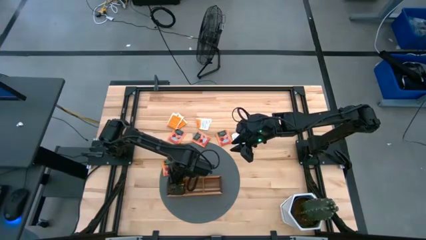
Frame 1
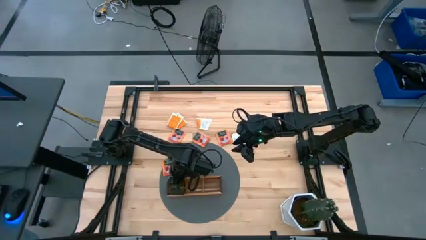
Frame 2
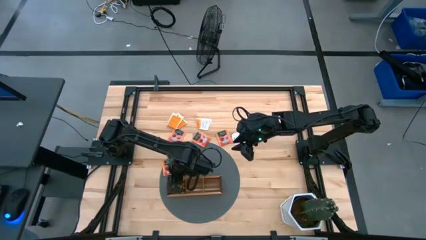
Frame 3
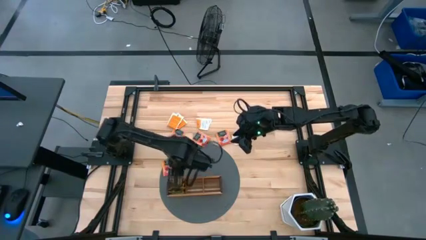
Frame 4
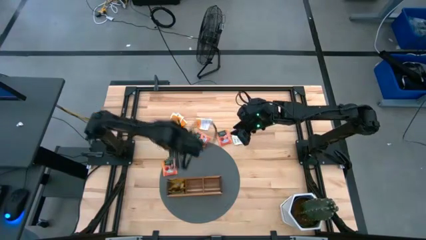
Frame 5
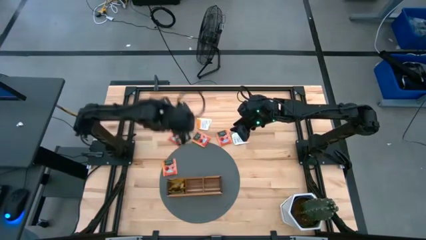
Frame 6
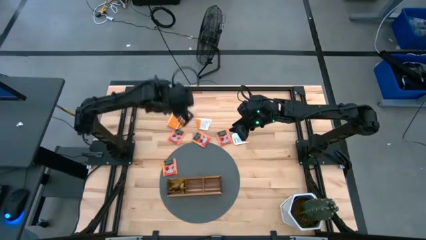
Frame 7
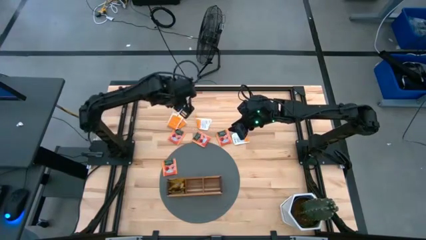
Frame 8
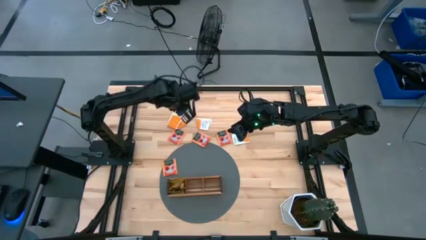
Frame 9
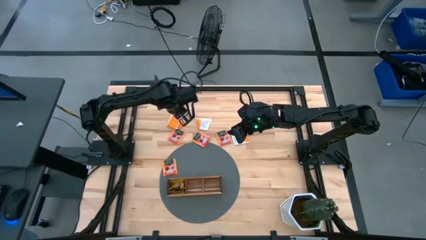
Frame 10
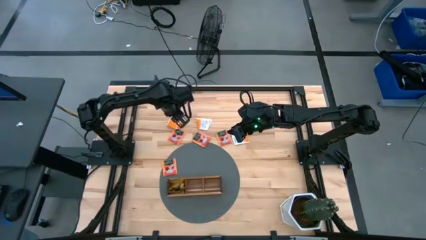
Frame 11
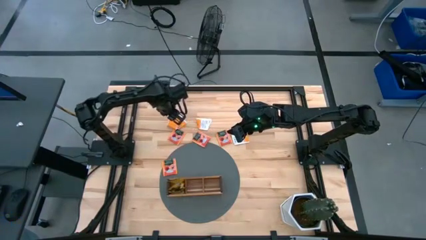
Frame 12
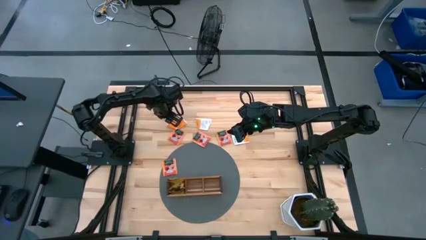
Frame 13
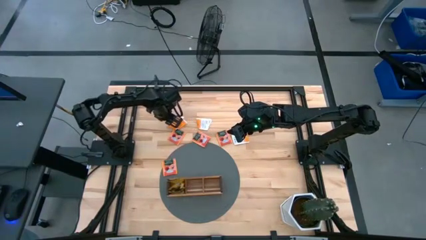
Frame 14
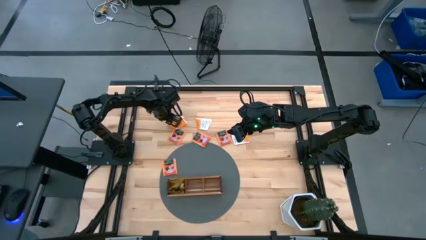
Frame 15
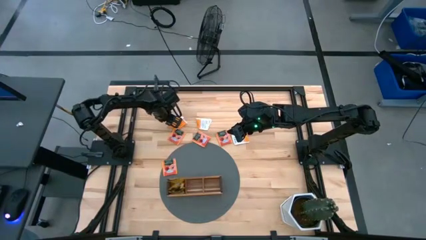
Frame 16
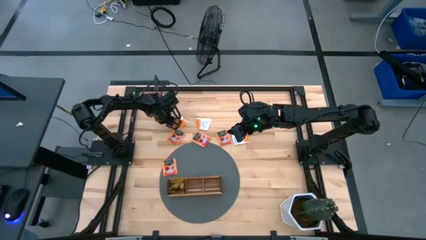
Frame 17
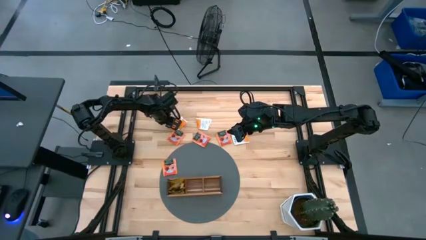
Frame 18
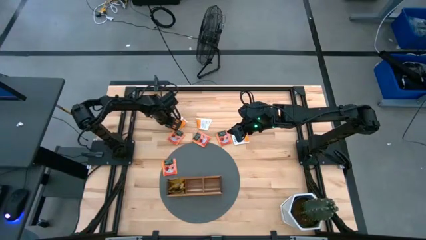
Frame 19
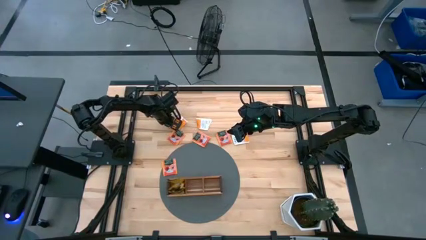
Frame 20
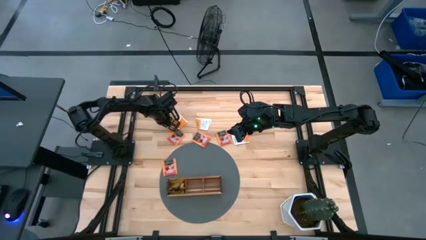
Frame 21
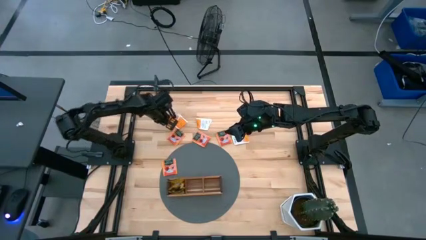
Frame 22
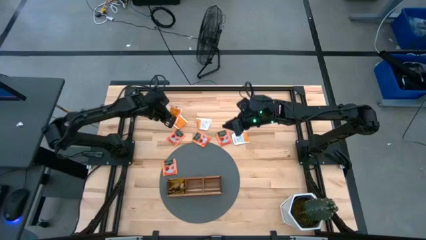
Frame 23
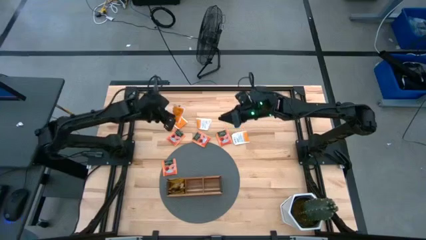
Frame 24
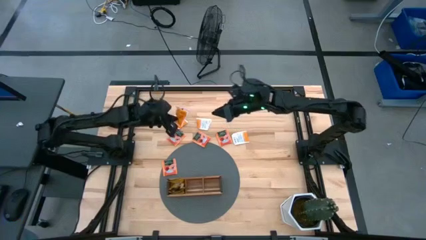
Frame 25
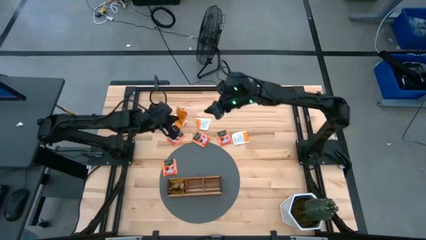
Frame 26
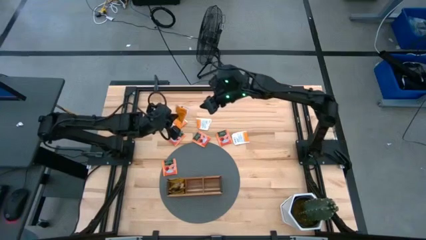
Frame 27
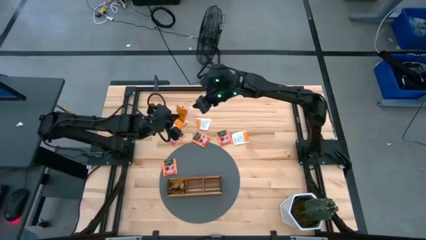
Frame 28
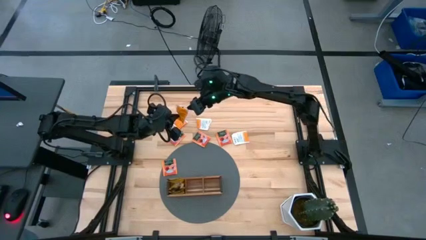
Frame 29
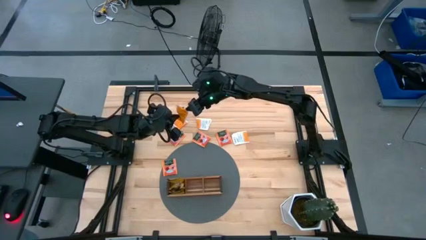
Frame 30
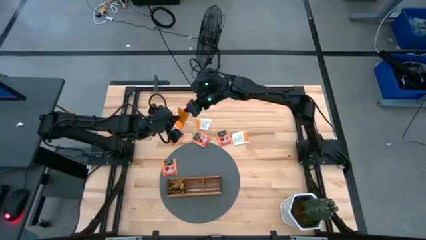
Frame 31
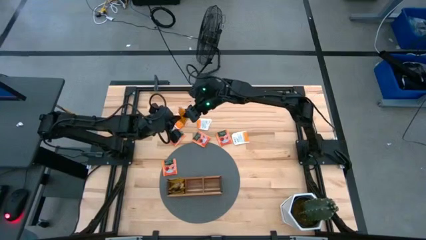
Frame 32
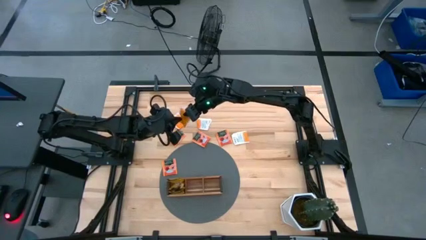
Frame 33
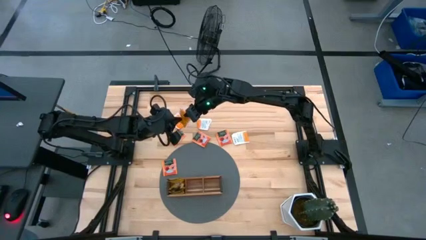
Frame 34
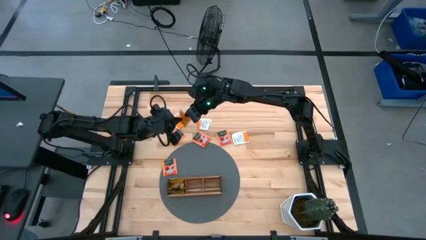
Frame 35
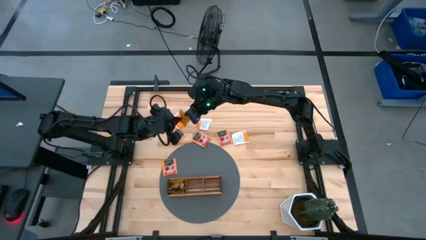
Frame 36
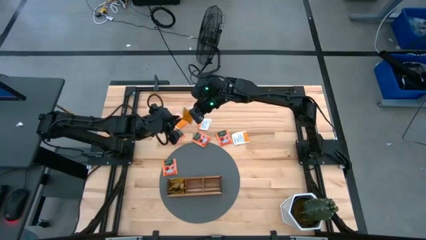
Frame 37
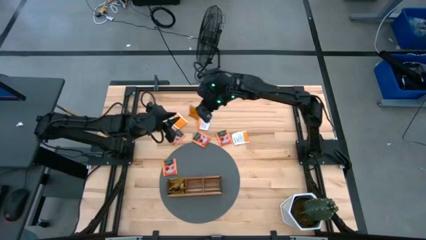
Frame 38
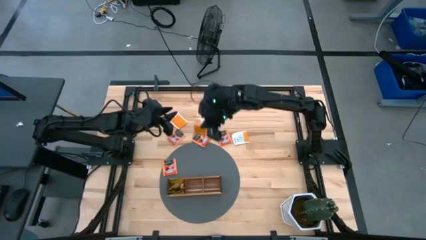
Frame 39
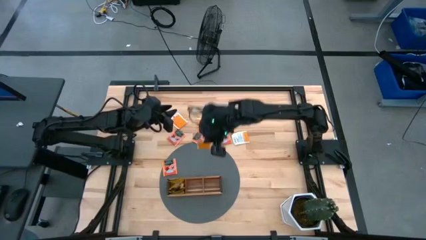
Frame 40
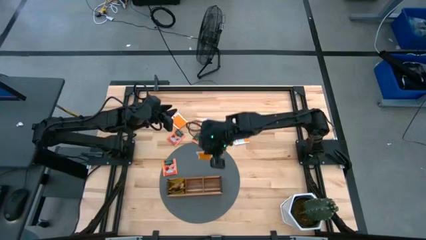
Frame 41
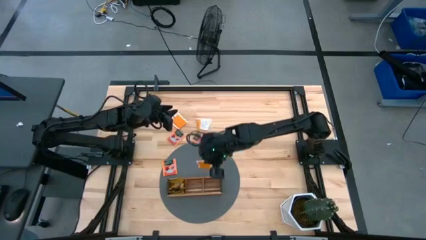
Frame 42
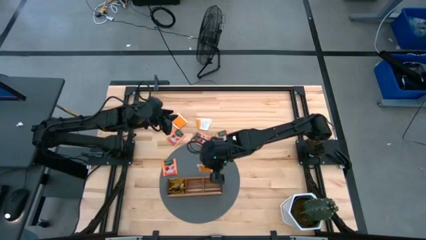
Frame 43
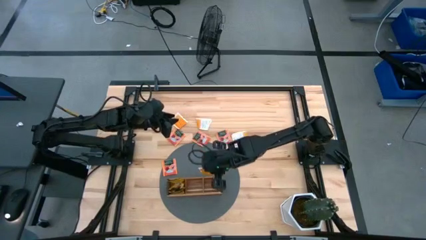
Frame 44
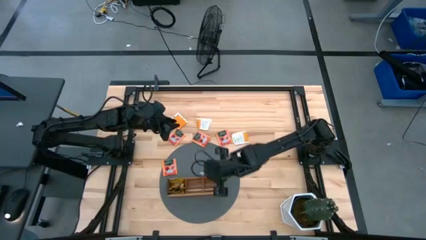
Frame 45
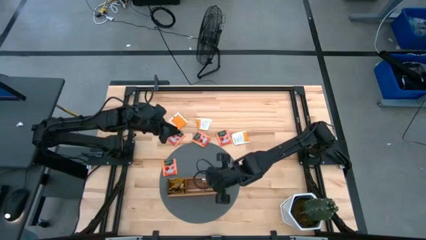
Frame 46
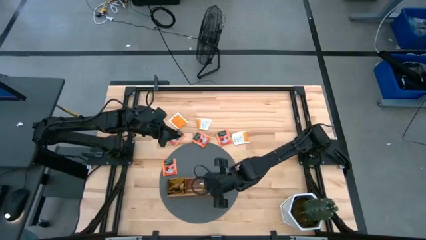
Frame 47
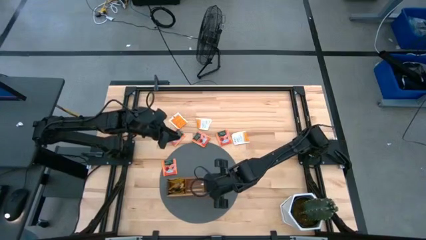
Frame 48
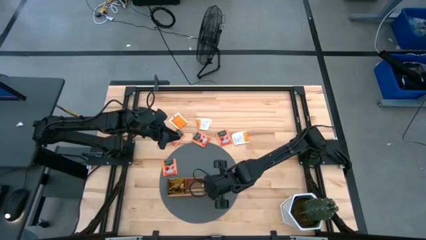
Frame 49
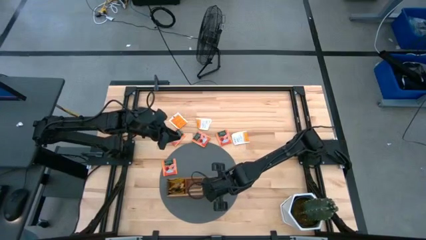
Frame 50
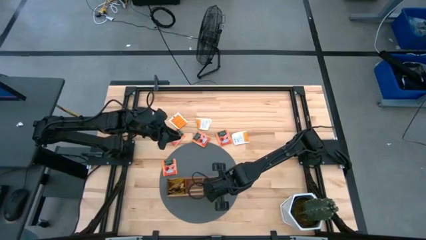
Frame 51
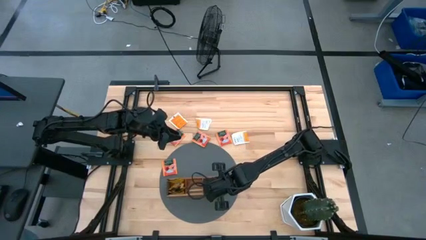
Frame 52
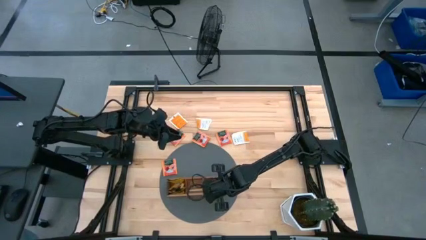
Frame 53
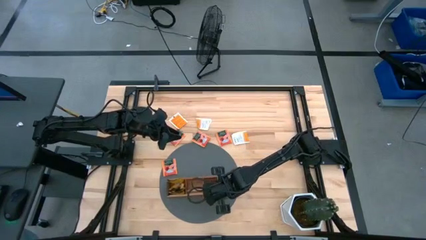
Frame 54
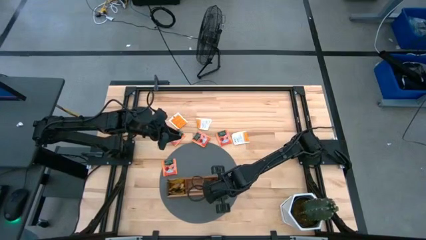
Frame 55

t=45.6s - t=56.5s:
Task: Pick & Place Tea
Put the orange white tea bag into the right section of the wooden organizer
